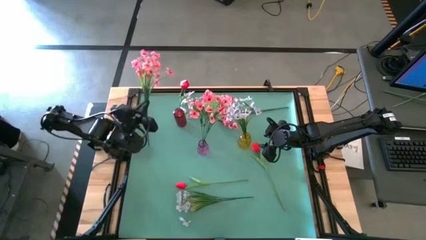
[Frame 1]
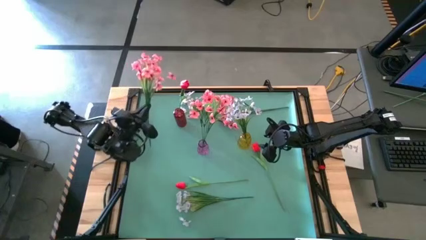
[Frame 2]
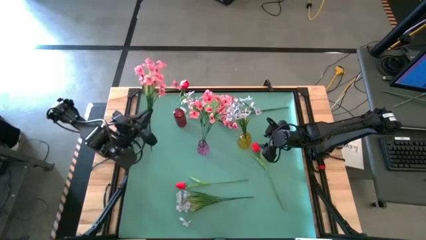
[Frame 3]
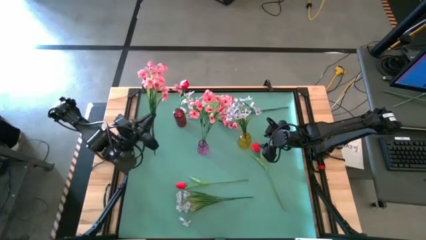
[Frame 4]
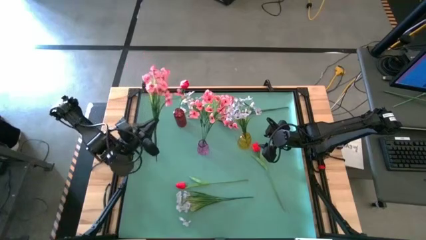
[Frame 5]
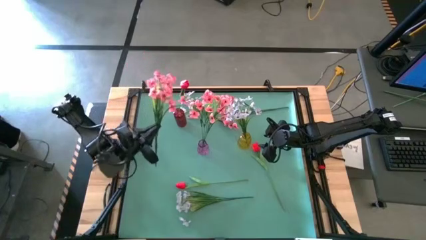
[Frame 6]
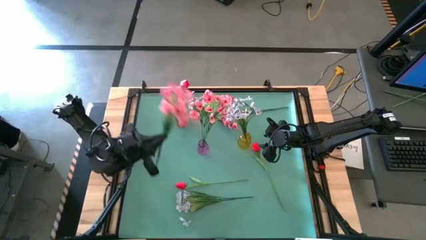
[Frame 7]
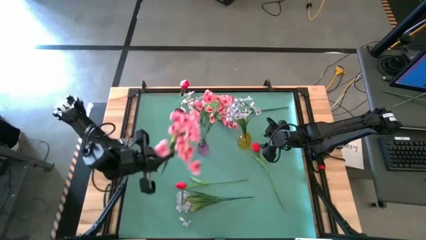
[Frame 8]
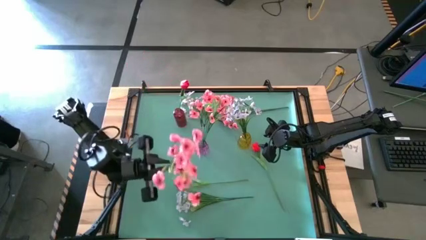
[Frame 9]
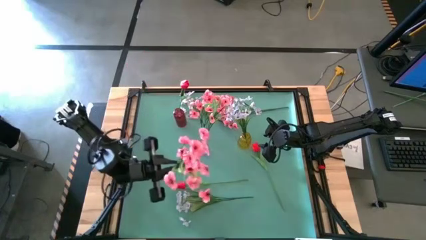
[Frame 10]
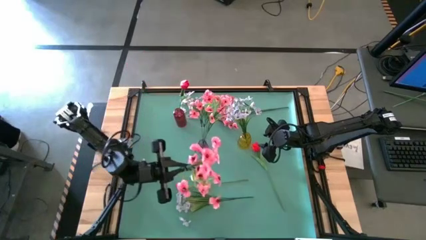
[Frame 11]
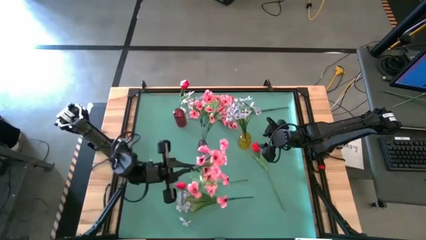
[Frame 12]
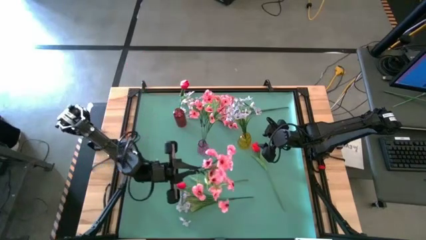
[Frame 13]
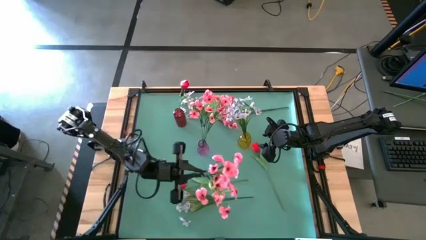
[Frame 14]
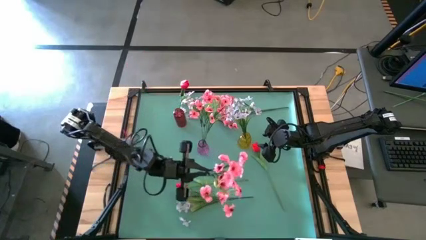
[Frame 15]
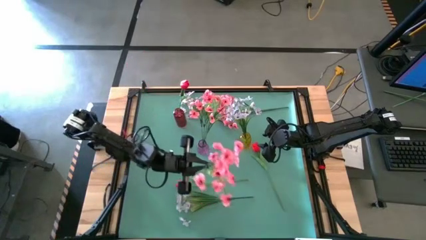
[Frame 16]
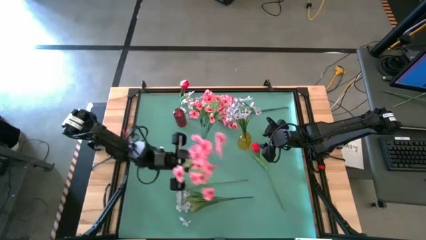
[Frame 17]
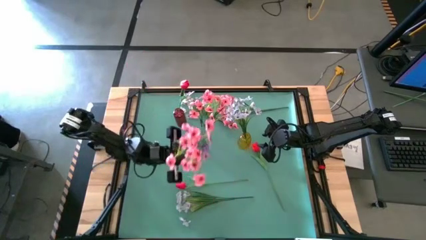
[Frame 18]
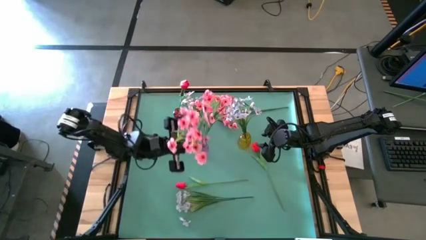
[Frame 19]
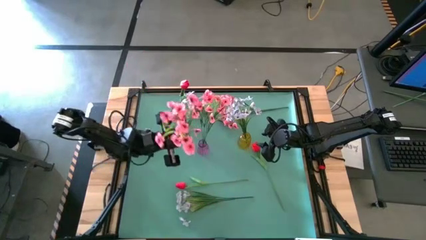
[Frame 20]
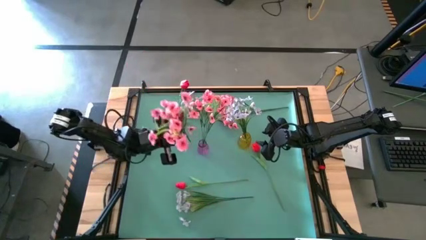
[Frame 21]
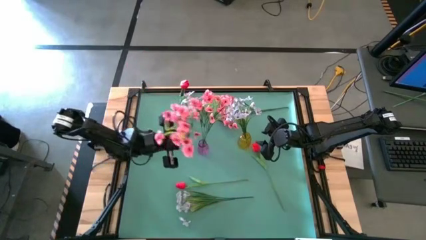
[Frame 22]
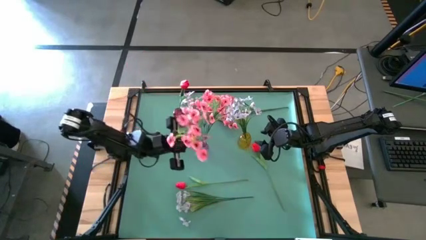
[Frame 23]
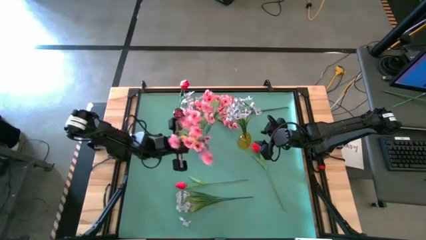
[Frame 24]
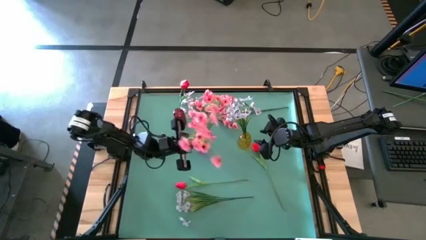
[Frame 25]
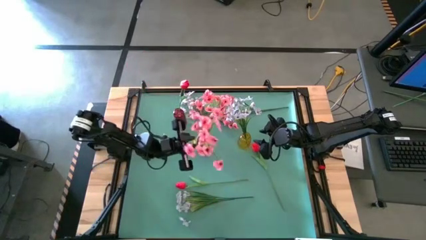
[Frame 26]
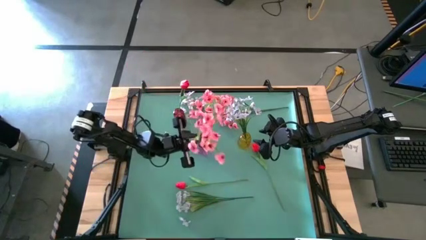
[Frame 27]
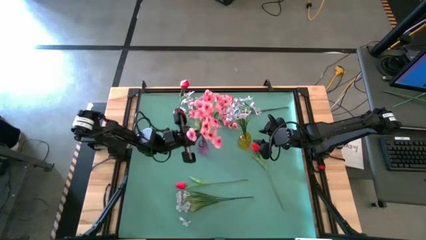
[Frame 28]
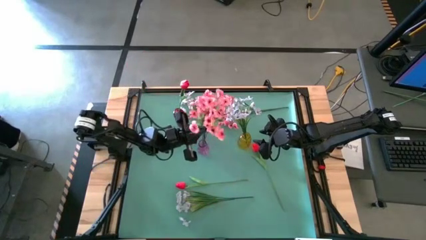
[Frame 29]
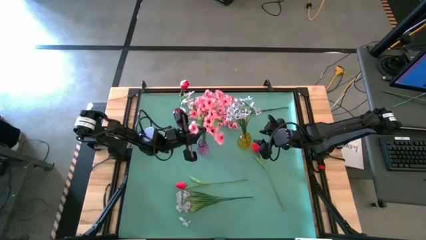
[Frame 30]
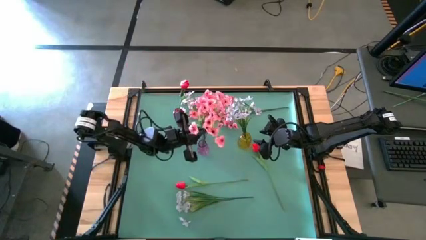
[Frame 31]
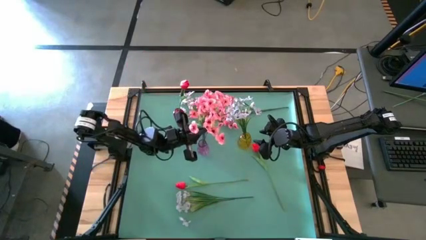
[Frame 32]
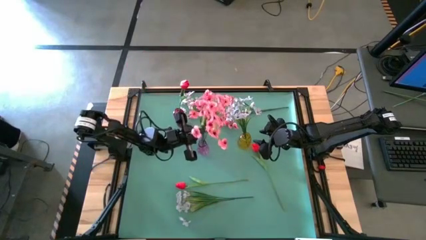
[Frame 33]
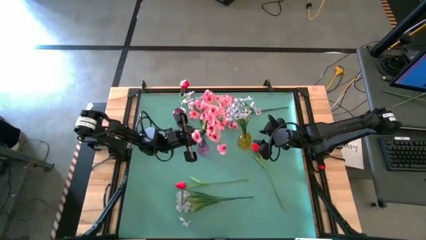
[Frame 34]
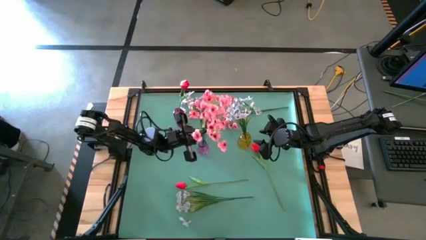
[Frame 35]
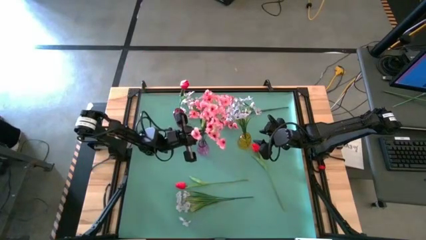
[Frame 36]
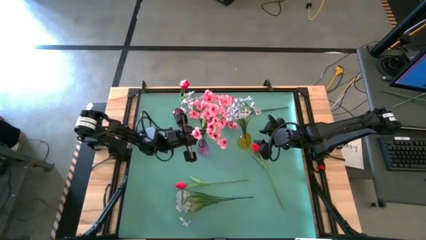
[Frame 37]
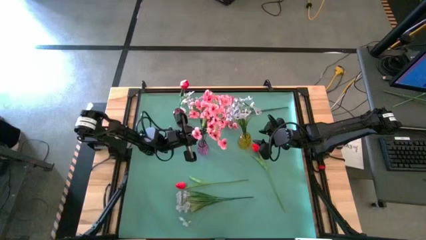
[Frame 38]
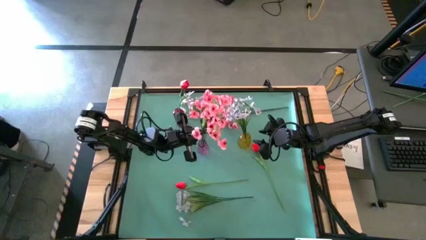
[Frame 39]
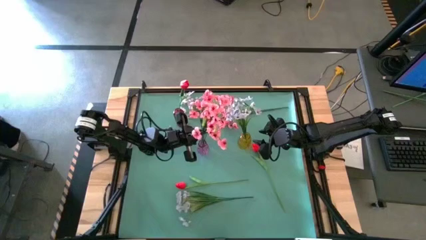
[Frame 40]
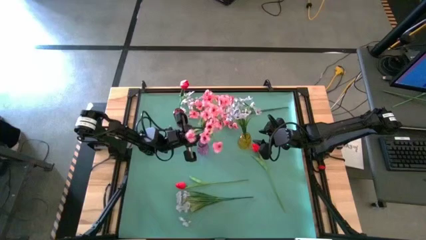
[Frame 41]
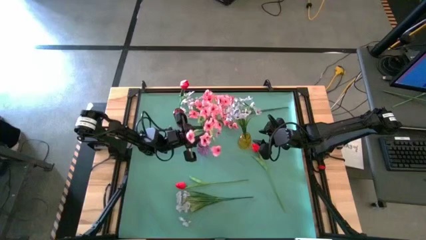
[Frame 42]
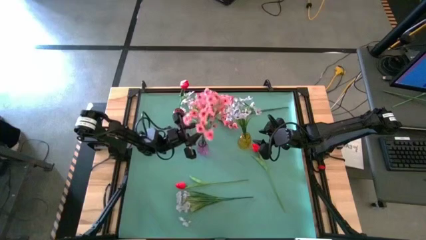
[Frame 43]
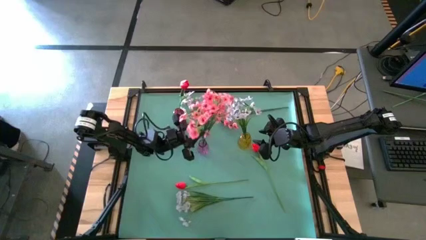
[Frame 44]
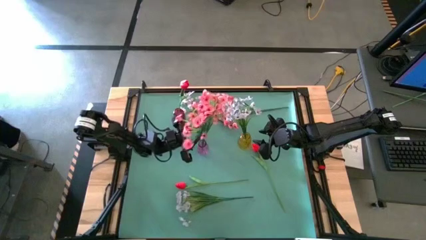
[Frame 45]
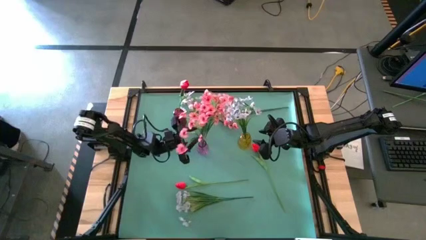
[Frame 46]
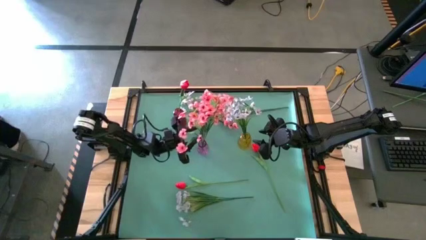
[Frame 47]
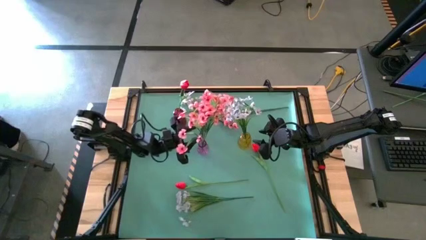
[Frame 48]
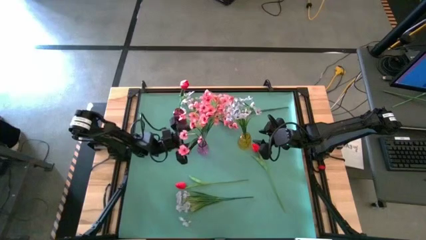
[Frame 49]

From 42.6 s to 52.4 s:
Task: Sort flowers into vase by color
Put the left pink flower into the purple vase
